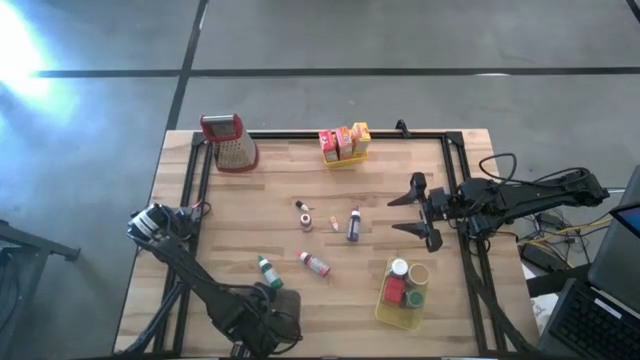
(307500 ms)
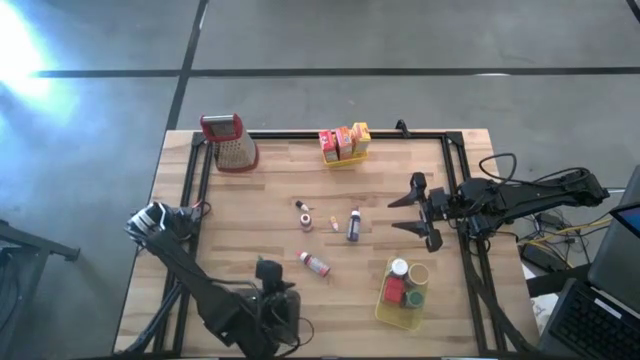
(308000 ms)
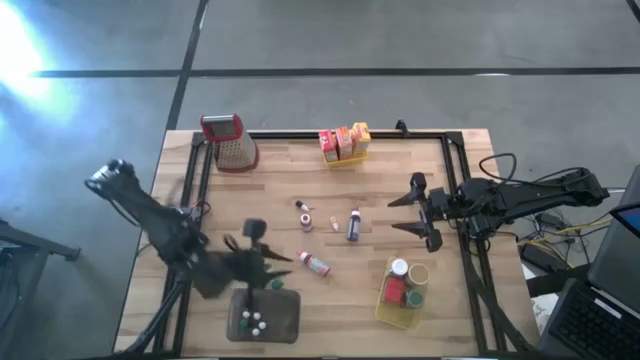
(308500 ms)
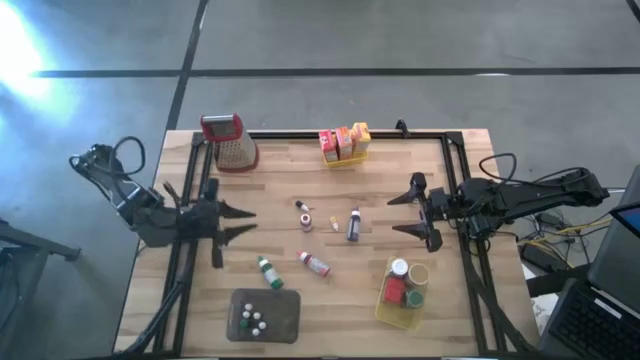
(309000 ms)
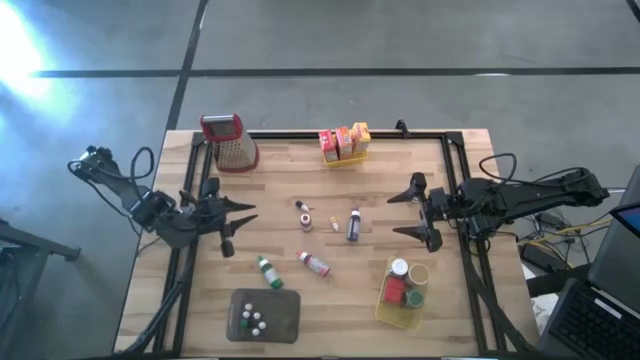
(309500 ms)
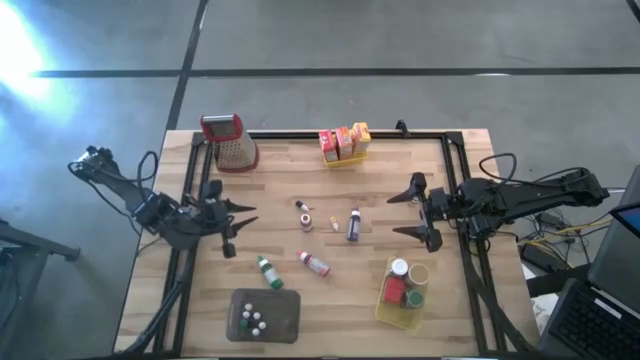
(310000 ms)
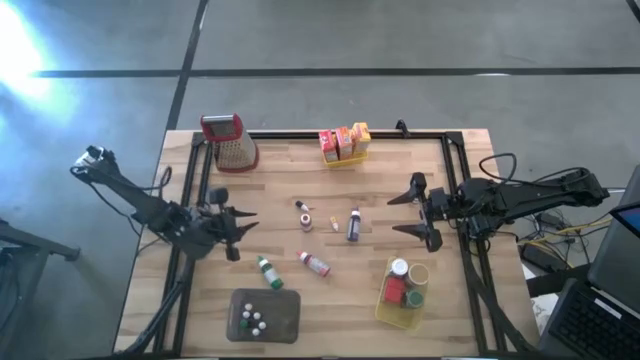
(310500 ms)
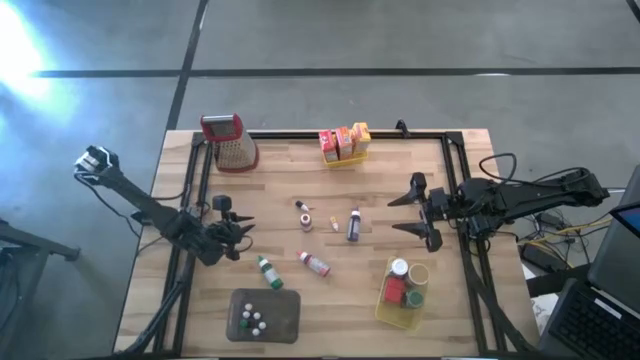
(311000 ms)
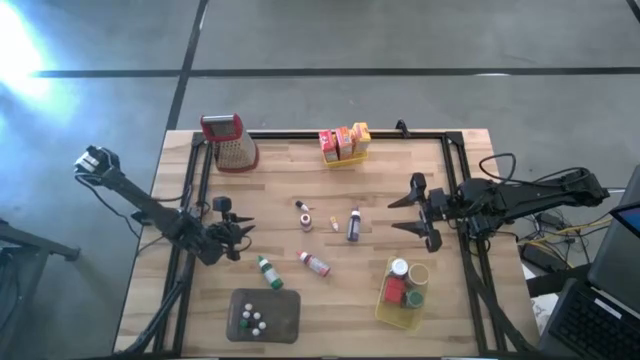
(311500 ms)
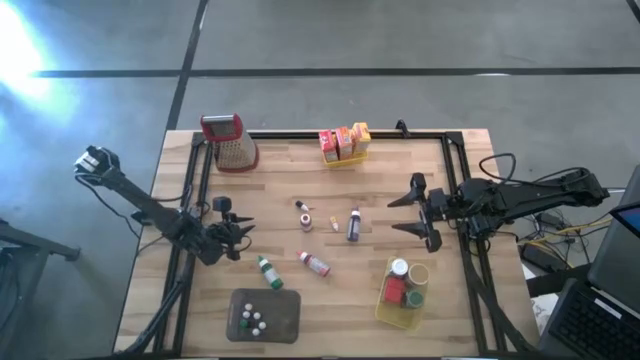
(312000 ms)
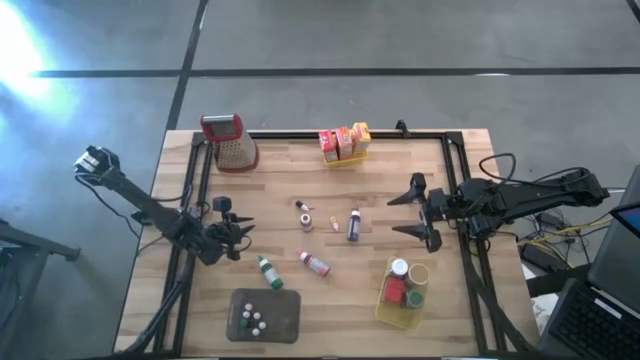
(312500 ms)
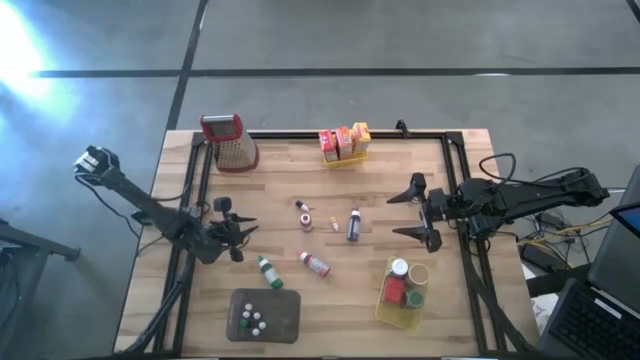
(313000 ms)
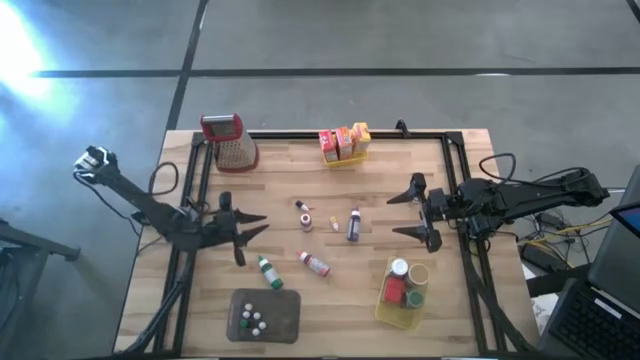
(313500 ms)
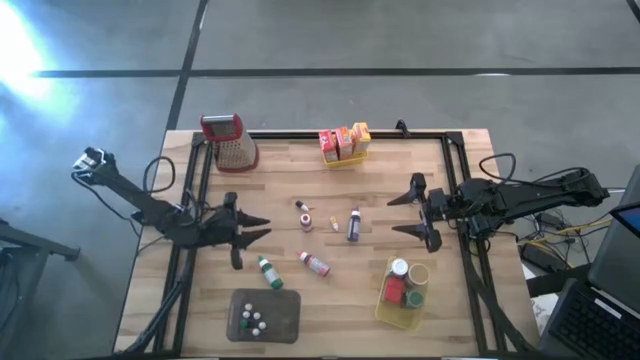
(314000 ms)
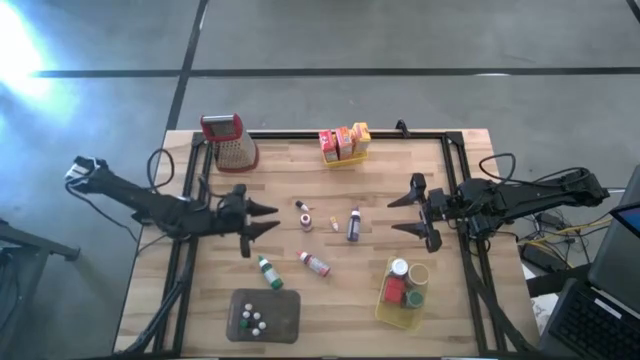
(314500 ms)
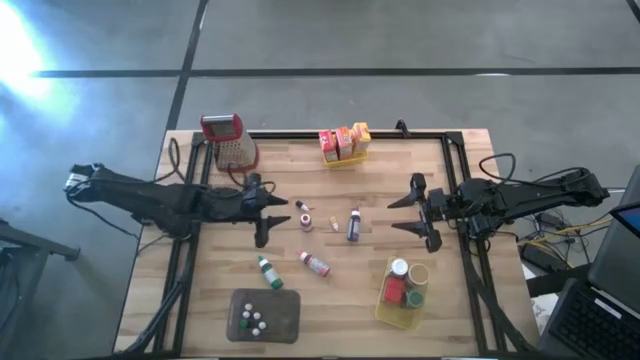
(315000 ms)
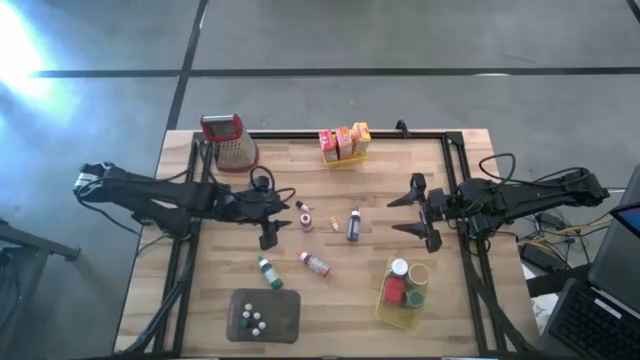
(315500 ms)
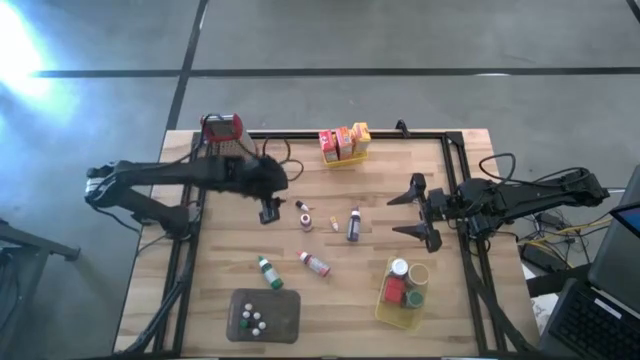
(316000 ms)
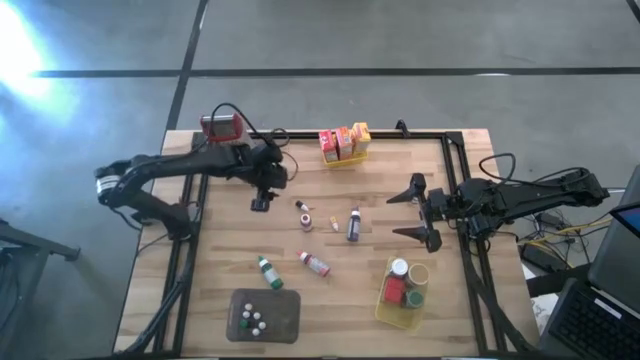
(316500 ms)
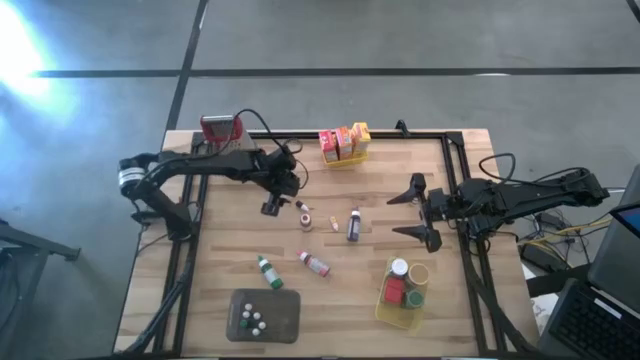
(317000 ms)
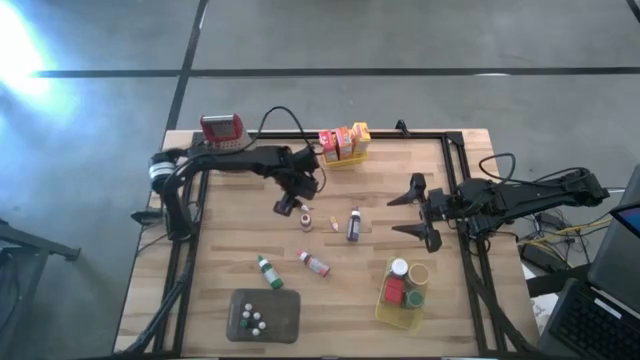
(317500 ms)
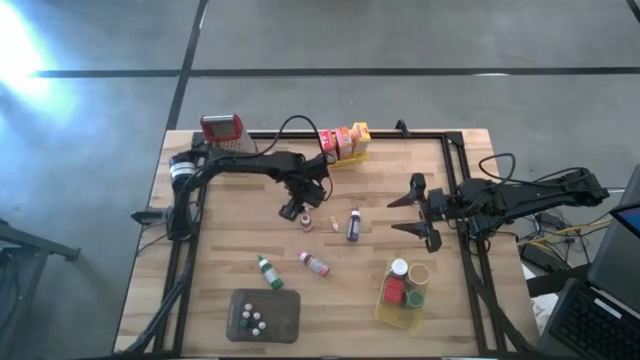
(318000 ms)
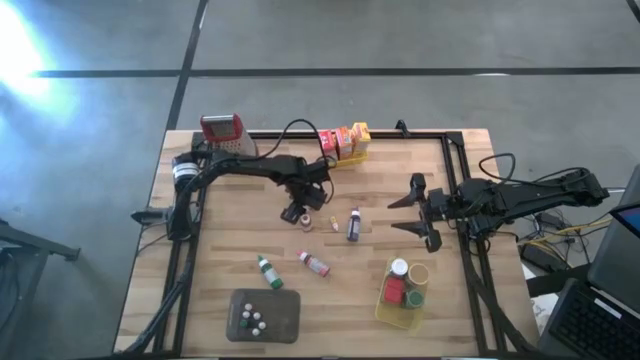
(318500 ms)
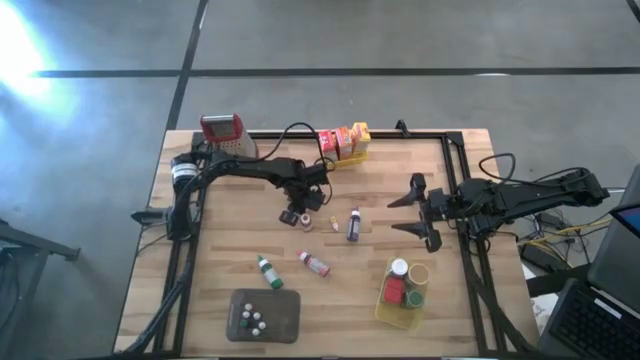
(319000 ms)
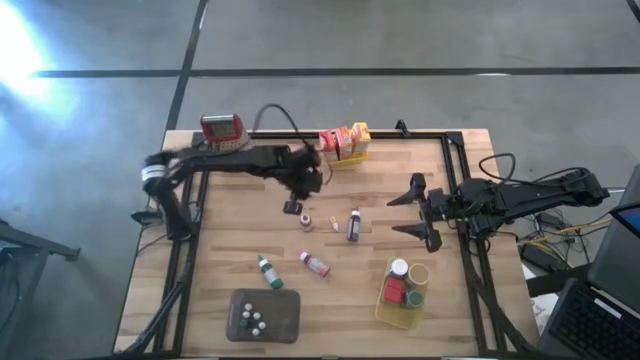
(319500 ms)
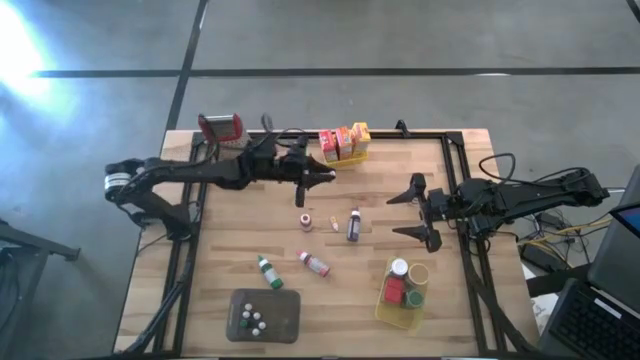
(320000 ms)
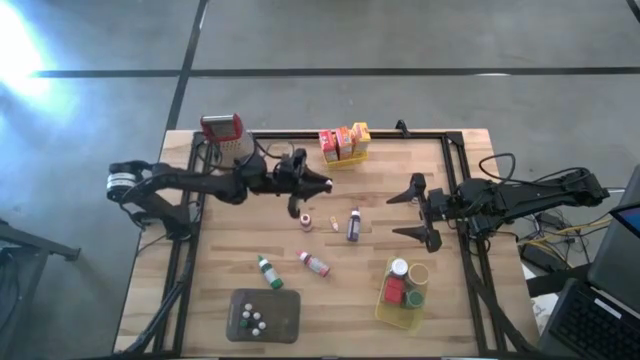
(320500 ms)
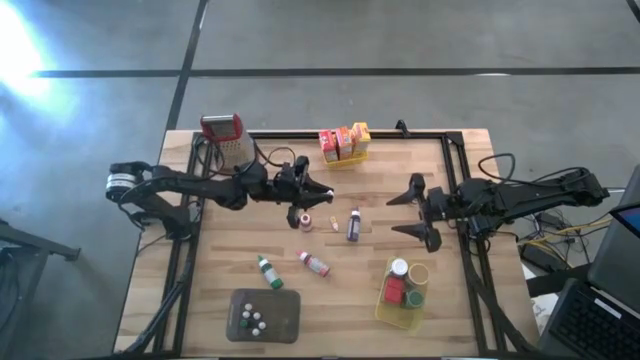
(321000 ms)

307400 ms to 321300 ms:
Task: Pick & Place Kitchen Items
Put the black food coloring bottle into the black bin

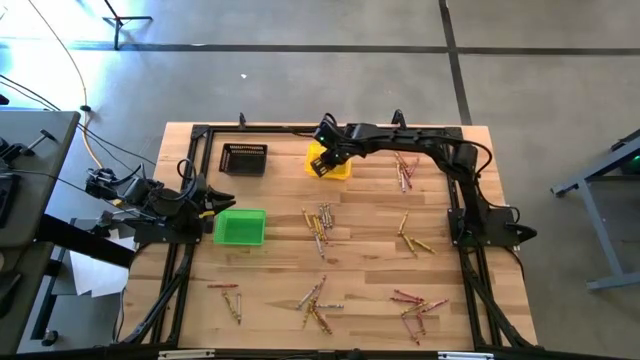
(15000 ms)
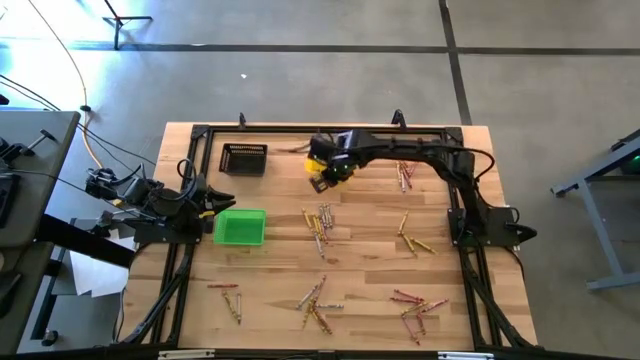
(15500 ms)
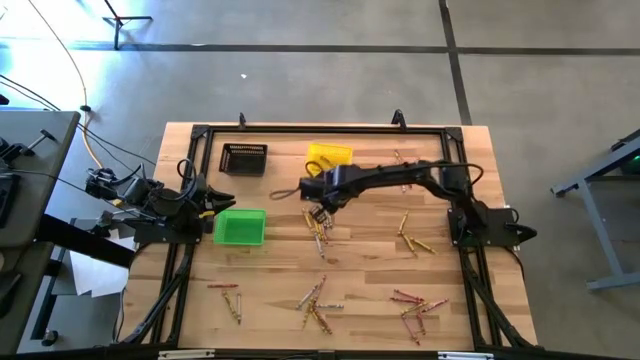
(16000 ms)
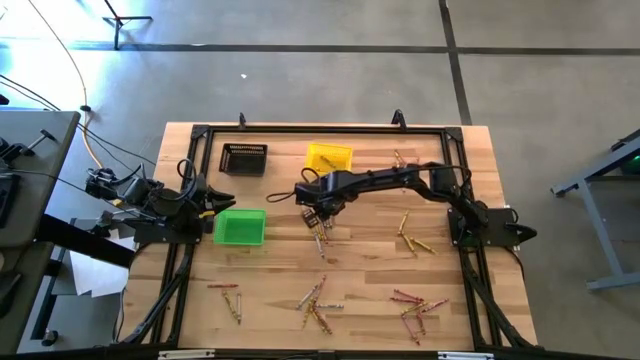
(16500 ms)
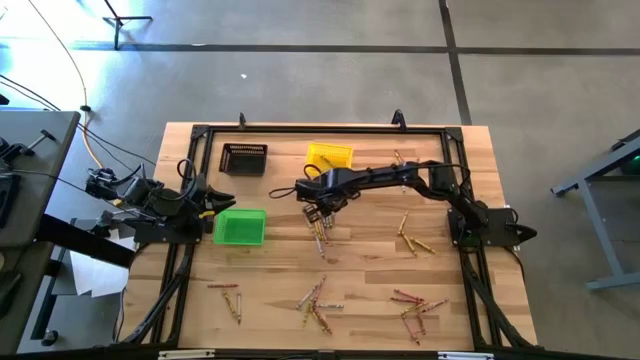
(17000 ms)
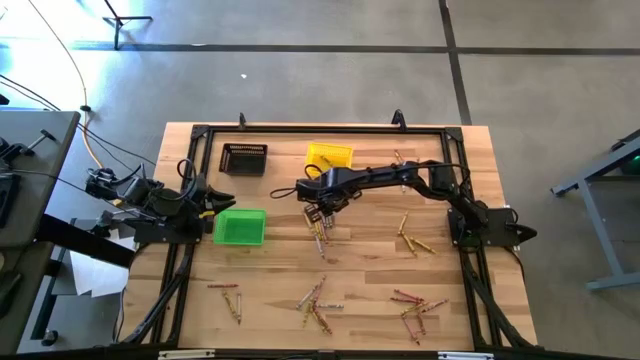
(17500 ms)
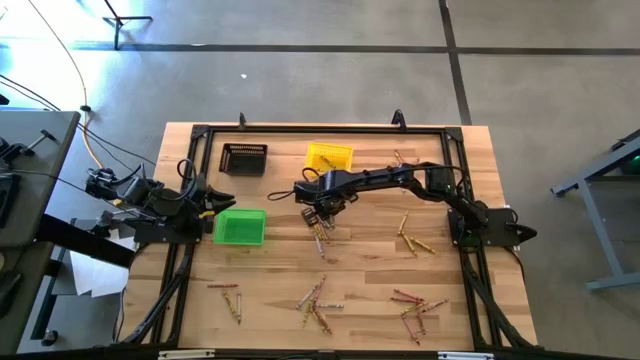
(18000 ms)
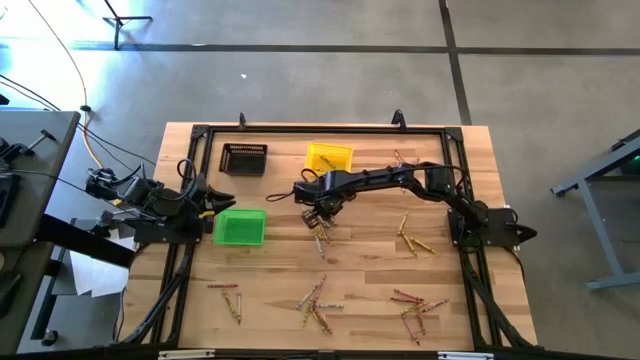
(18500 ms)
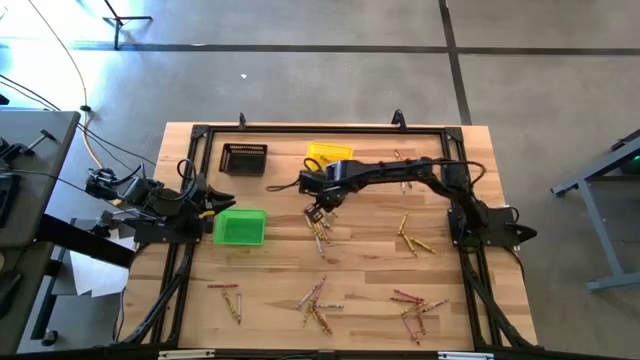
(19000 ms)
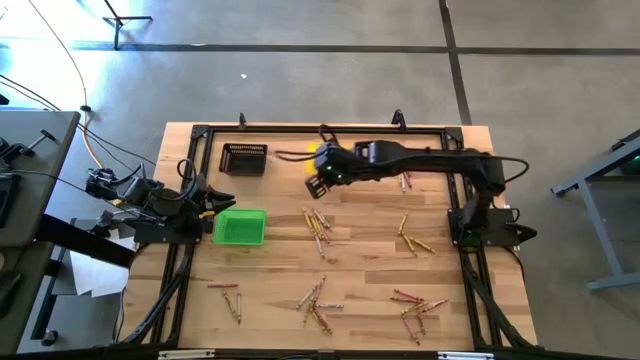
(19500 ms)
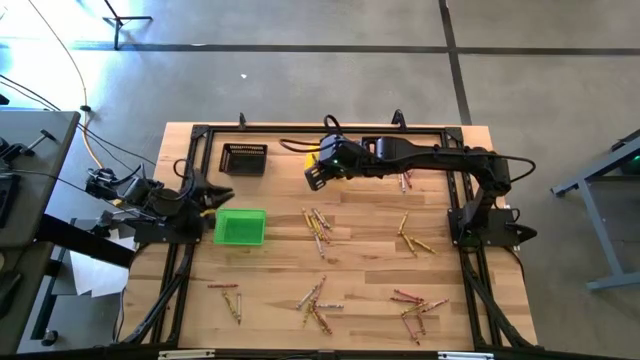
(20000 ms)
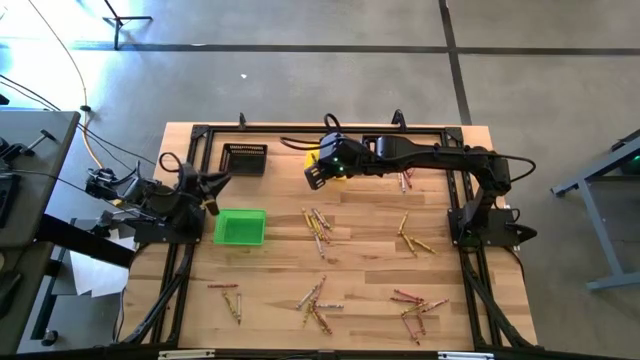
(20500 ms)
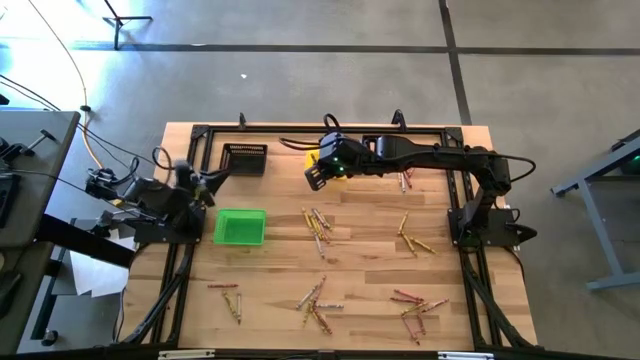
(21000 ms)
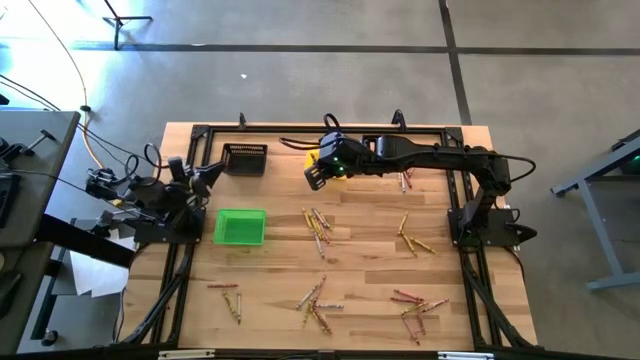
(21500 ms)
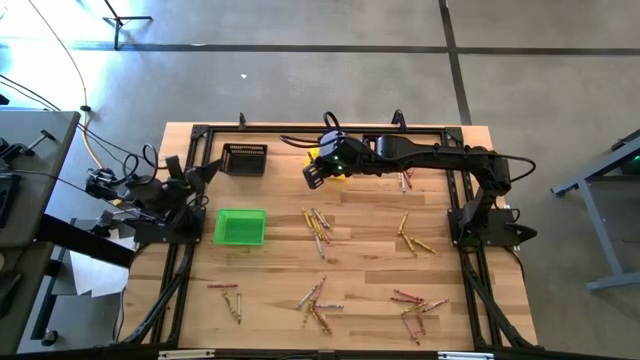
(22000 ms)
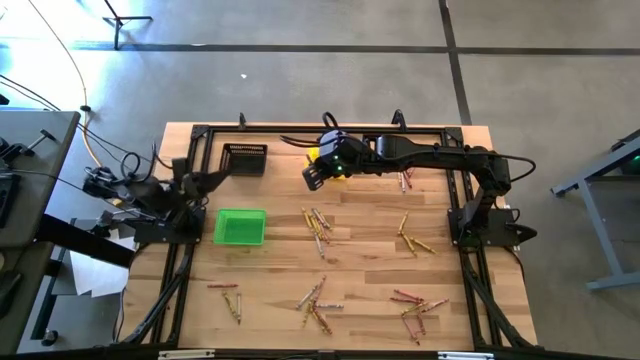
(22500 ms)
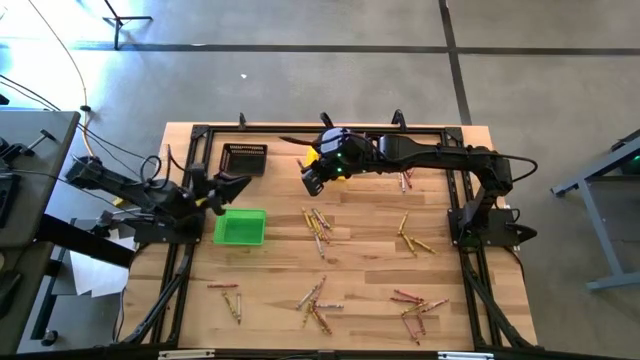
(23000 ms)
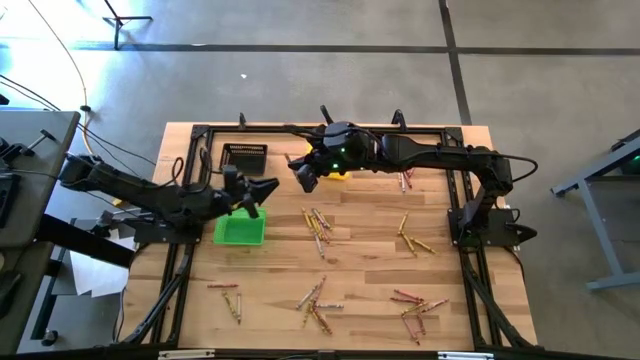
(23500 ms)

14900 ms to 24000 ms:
Task: Sort crayons
Put the blue crayon into the green bin
